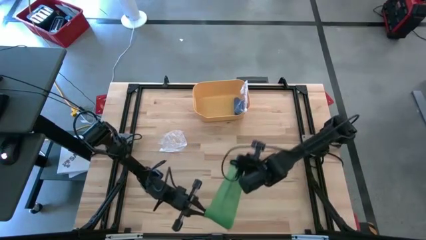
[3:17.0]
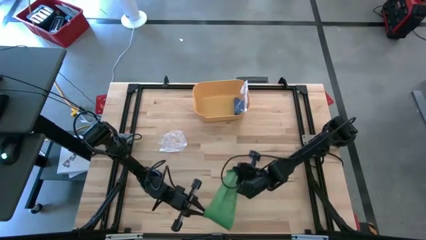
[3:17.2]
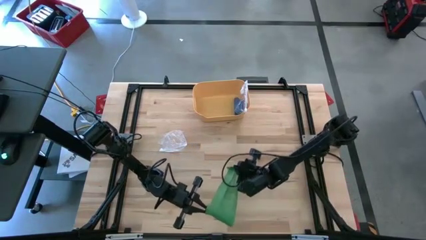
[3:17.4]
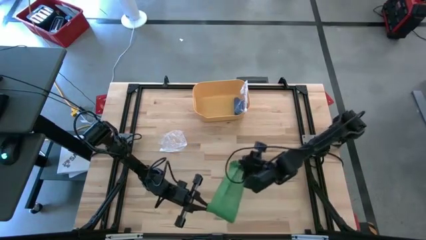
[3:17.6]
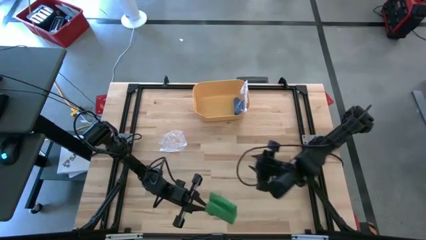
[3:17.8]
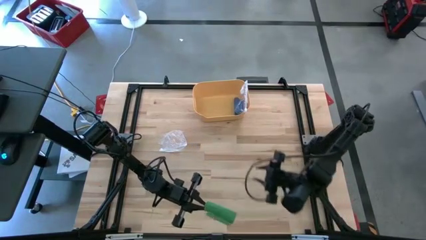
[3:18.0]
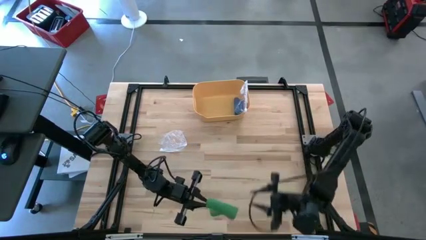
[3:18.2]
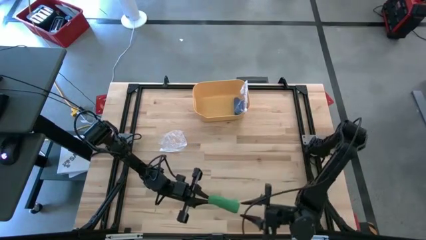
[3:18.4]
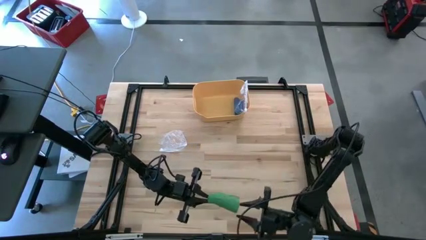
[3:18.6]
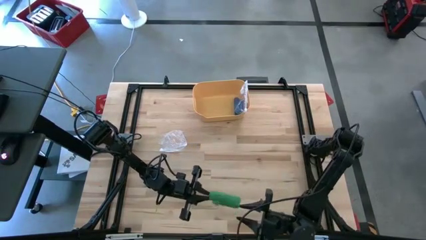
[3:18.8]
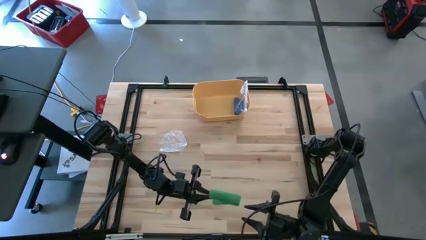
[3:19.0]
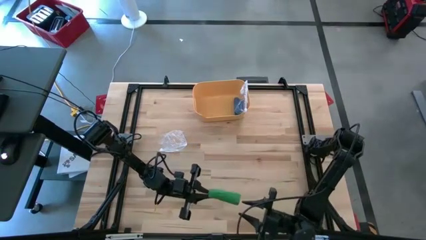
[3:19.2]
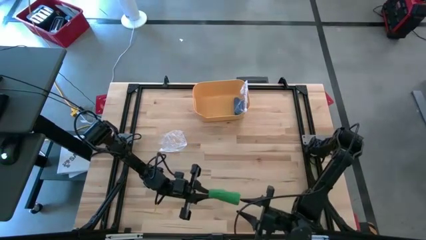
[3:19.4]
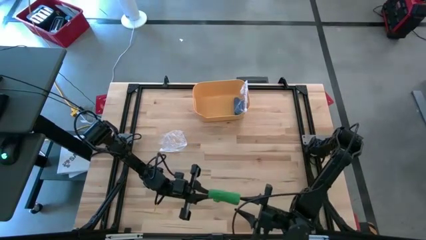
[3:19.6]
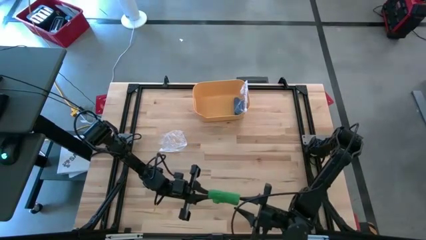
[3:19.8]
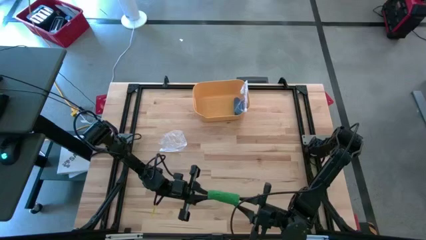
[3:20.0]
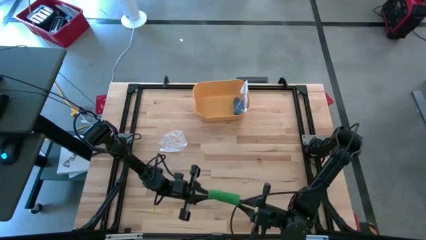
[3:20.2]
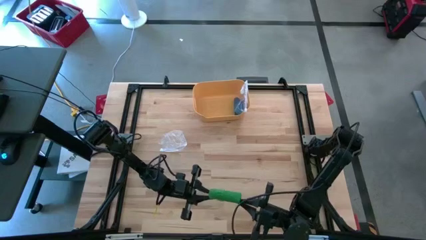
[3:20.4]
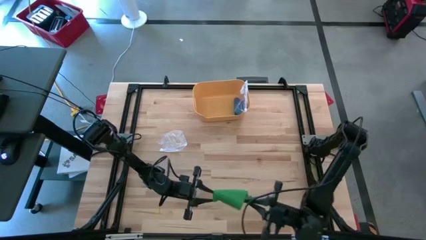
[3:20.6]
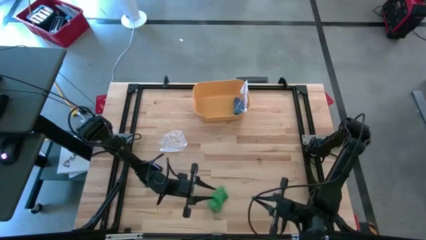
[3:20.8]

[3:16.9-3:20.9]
Task: Roll bandage
Roll the green bandage

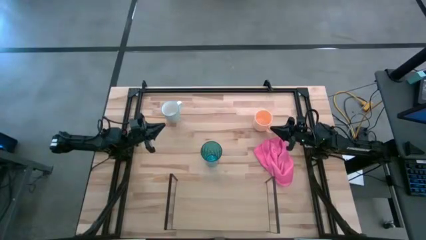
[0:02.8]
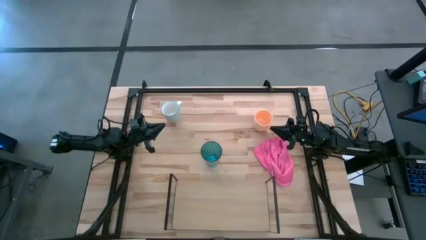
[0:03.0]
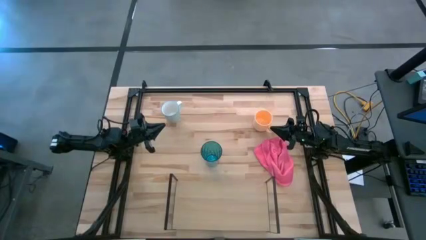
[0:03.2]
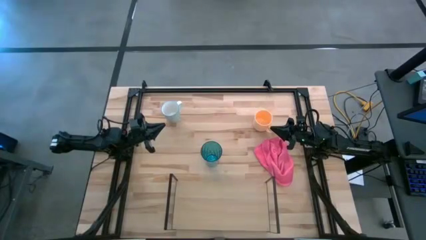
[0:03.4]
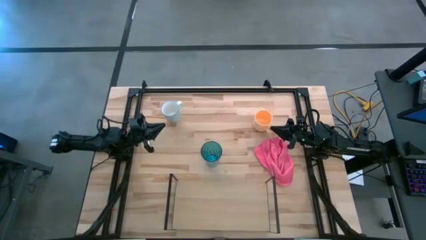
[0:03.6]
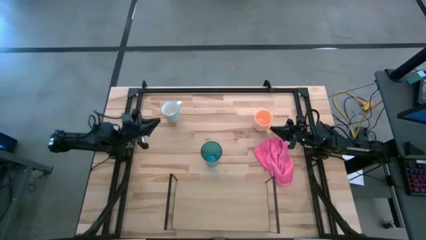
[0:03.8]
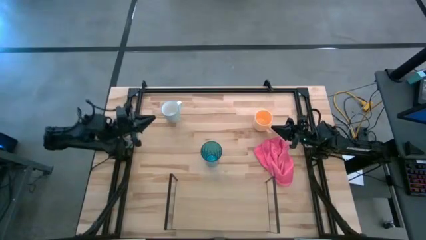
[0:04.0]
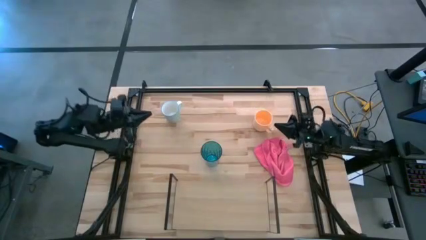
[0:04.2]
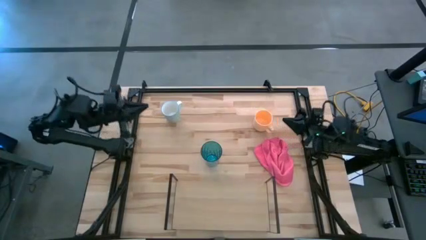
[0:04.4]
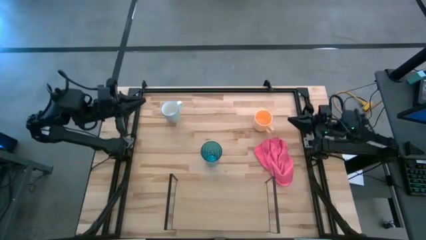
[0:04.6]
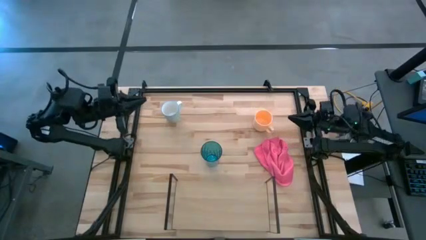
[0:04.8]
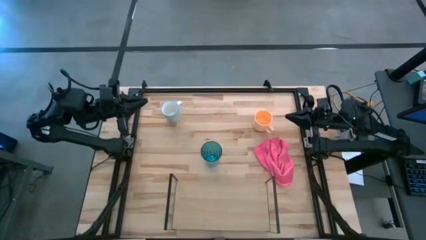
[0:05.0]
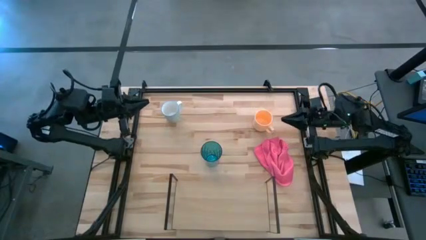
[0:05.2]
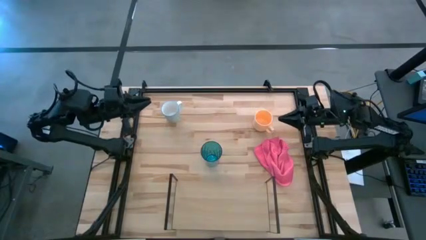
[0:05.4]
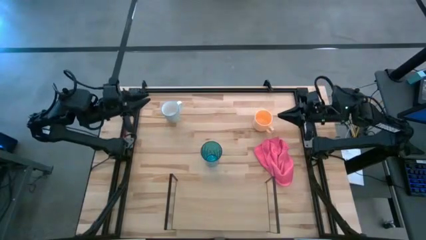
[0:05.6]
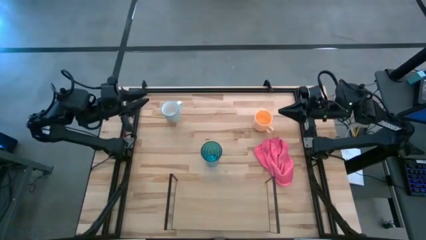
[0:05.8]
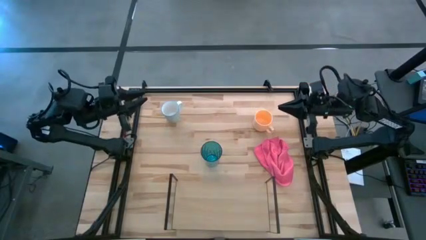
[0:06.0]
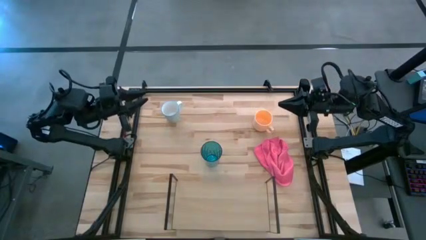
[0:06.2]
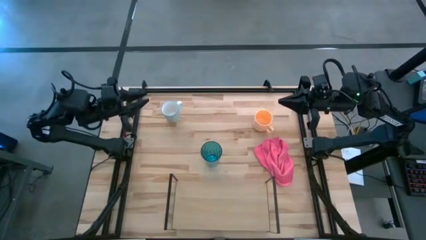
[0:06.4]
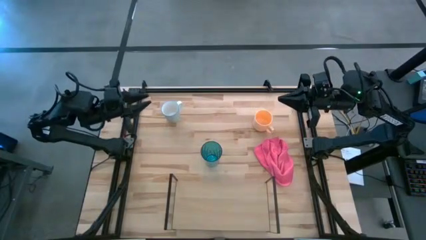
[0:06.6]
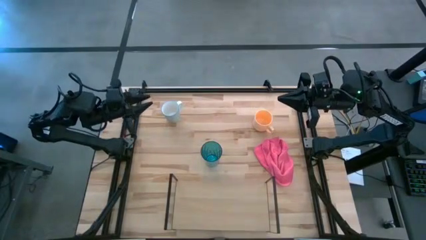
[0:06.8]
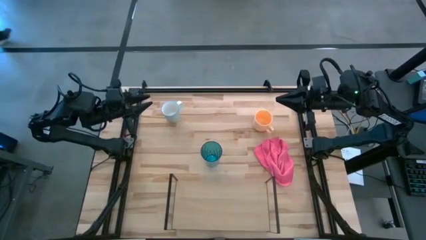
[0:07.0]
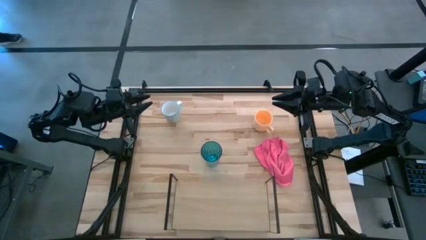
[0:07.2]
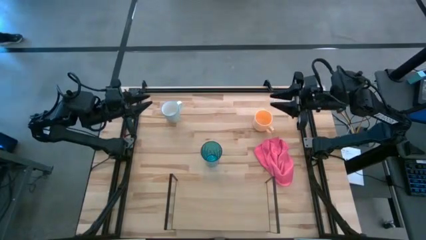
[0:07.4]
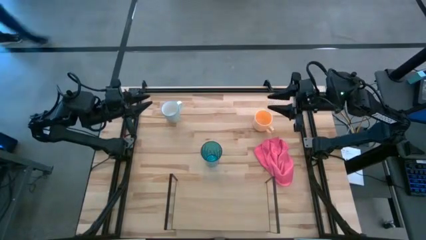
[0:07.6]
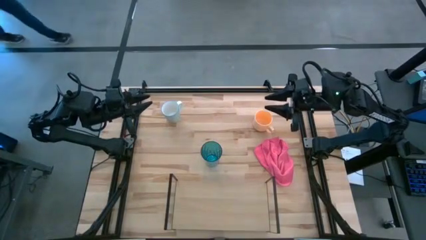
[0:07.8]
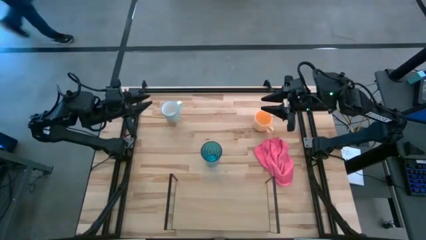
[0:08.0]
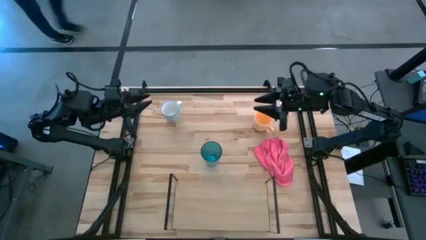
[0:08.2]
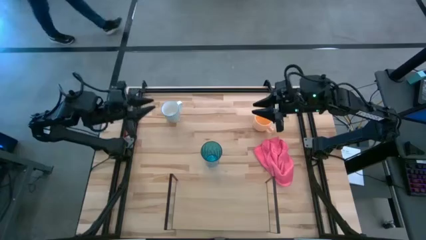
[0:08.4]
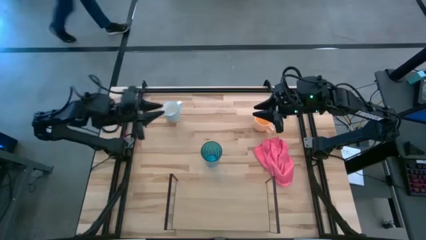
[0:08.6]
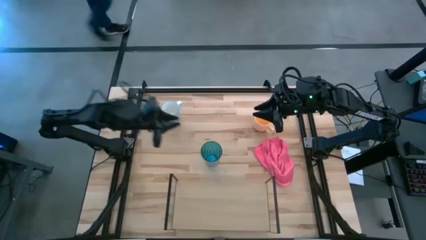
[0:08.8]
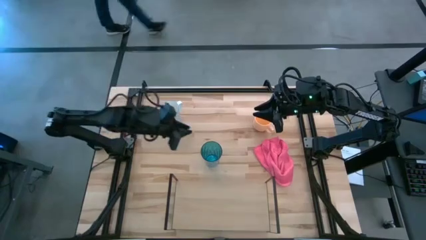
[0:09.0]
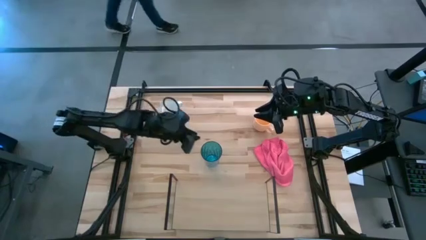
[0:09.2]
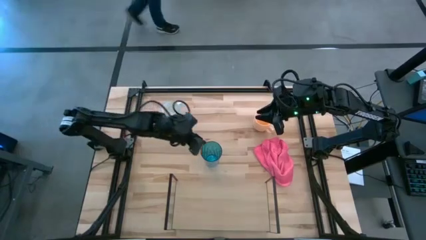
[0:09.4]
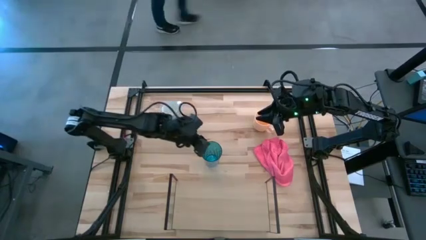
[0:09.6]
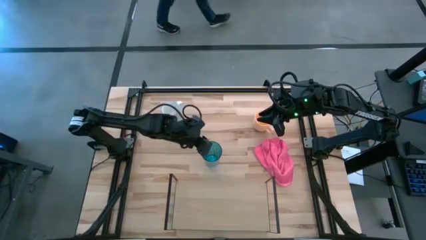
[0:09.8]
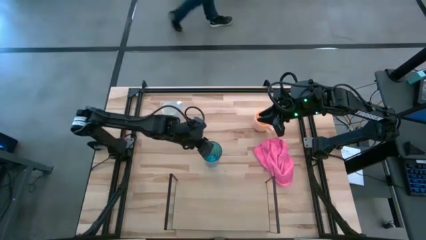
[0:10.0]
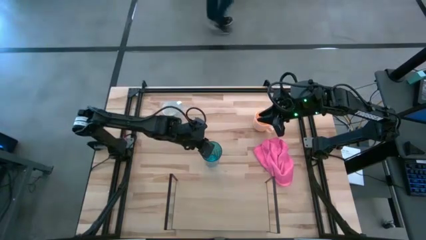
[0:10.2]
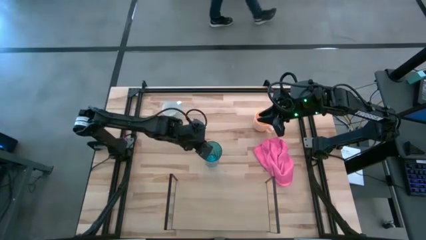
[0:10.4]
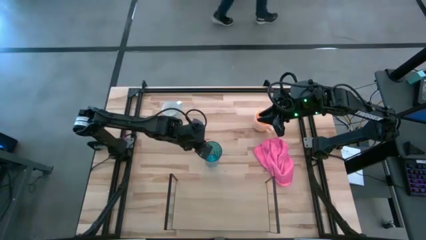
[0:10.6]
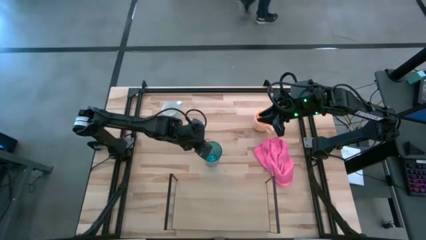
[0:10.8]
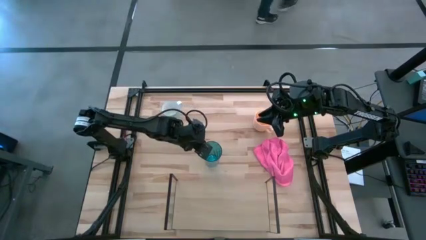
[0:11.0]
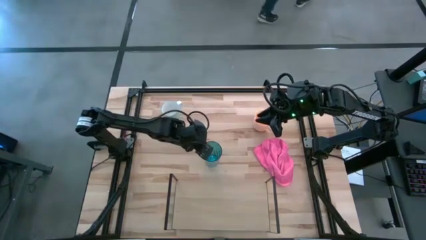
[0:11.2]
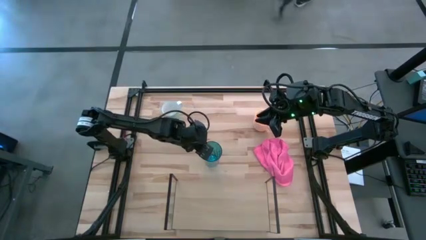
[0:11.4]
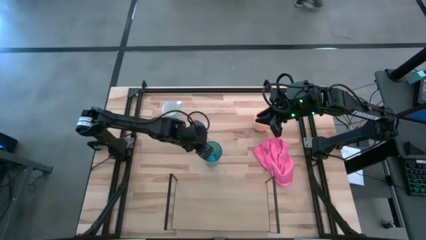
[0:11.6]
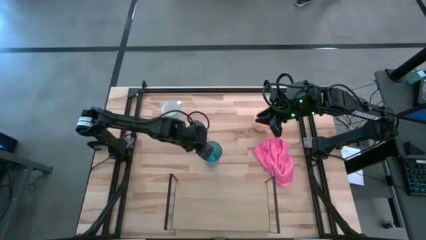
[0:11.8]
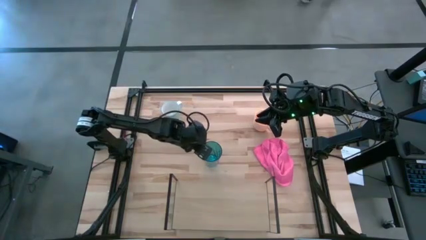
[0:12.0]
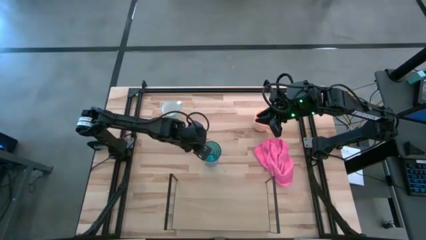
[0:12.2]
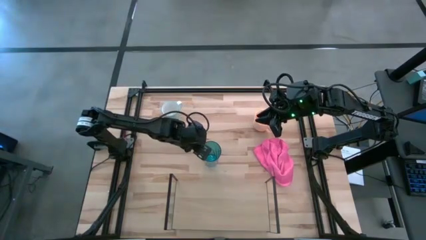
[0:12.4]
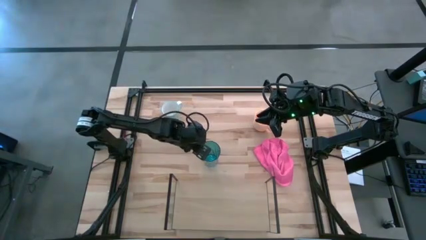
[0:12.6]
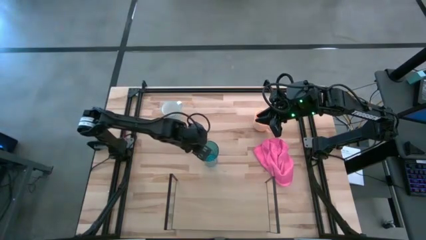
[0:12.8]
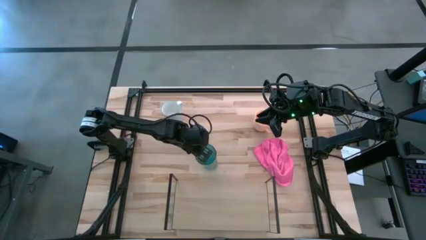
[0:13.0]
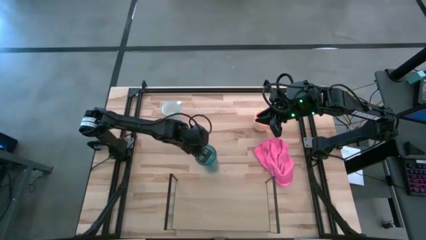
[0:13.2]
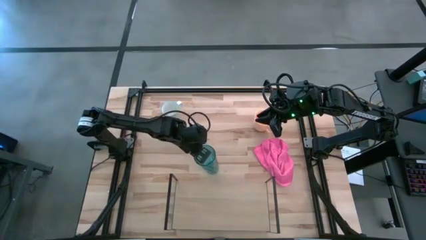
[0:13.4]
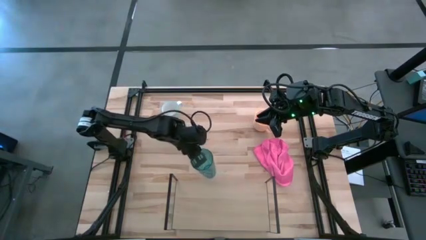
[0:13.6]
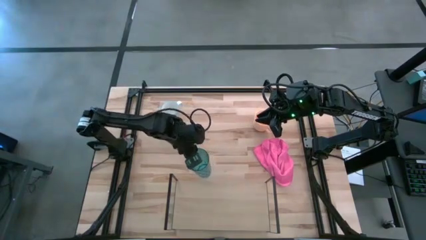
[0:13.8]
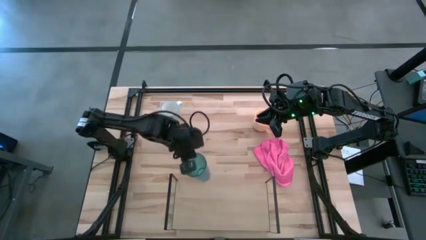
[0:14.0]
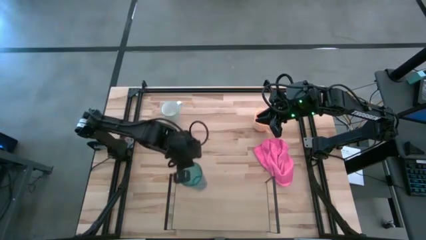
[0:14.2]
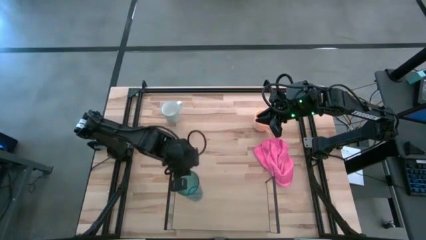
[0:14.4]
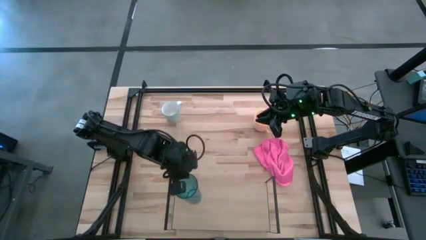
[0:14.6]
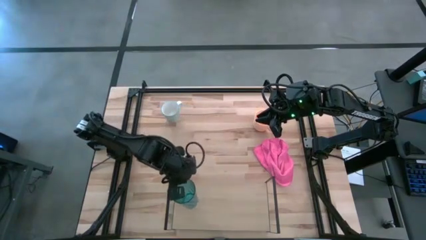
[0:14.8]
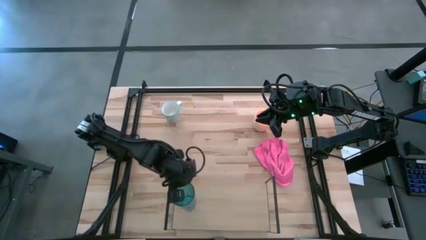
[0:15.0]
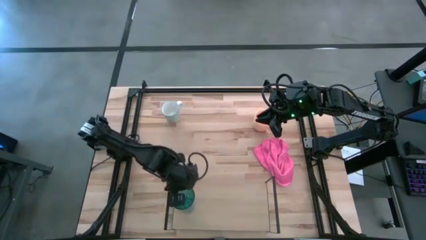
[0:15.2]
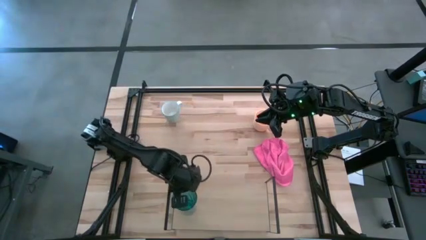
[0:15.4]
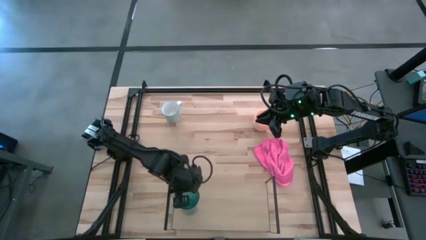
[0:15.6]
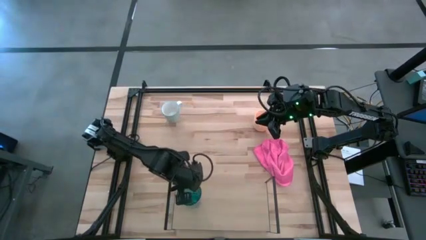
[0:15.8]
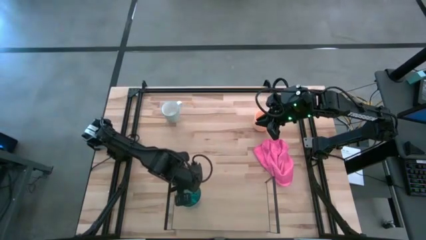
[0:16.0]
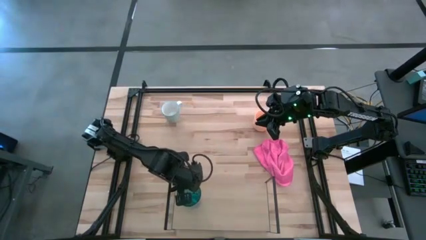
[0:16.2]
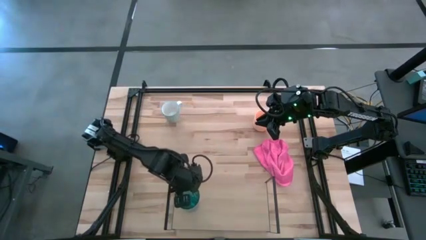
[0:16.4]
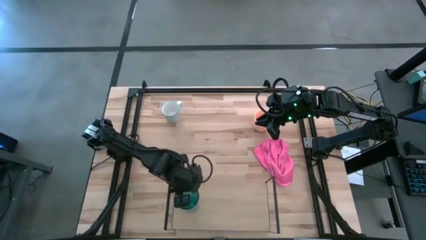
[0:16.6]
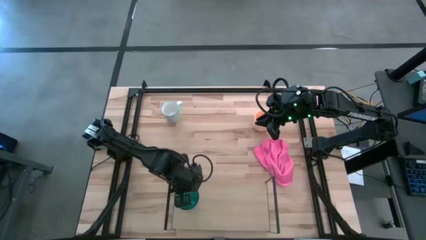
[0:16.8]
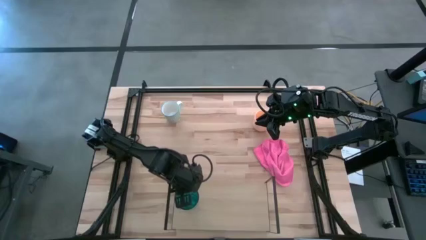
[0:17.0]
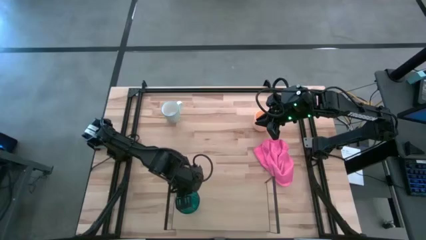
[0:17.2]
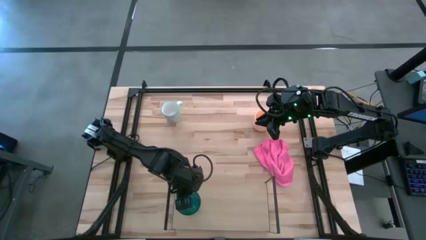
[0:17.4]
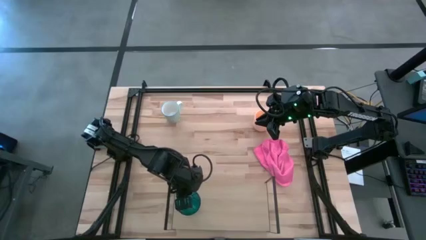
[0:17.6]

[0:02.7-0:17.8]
Task: Stack small to large cups/mugs on shelf
Put the blue cup on the shelf
